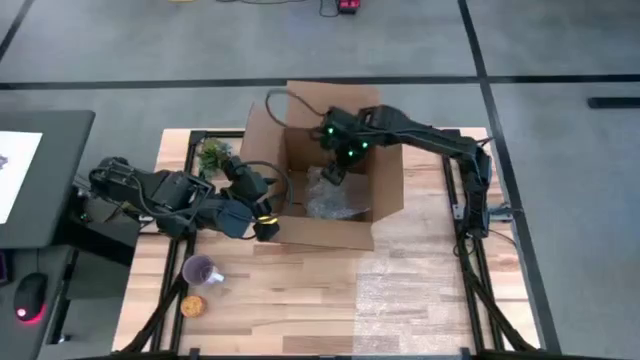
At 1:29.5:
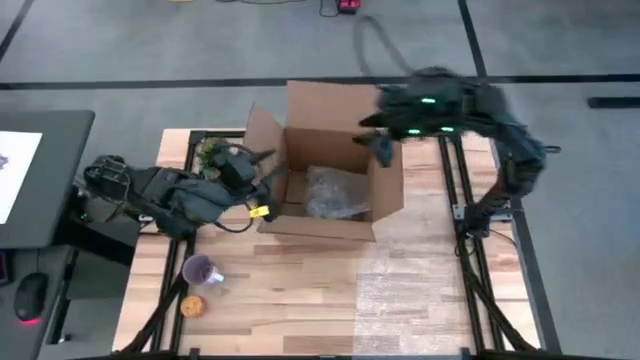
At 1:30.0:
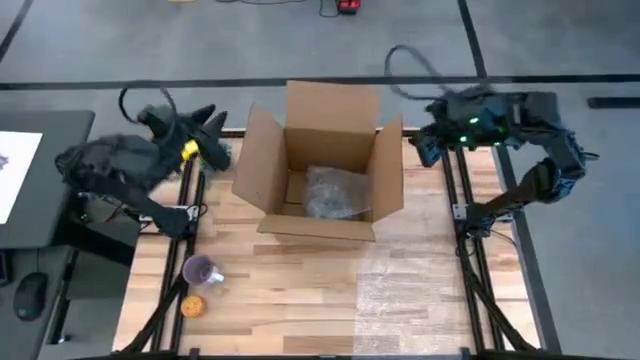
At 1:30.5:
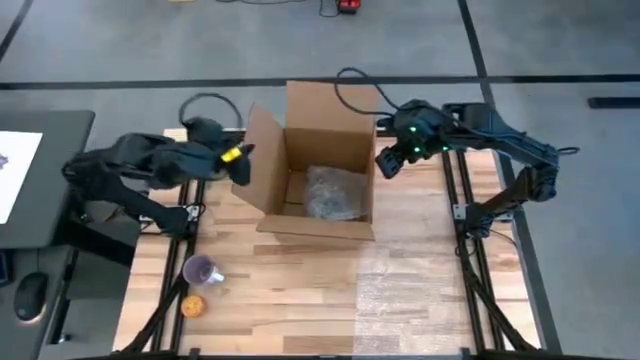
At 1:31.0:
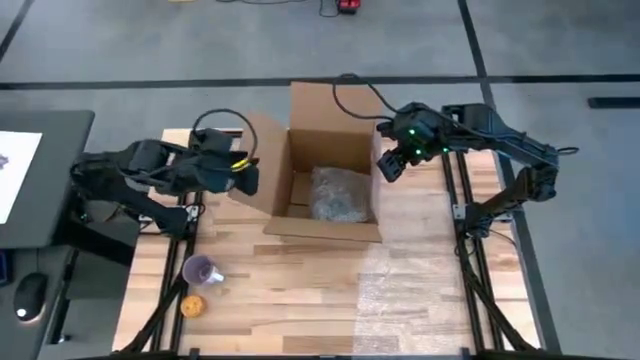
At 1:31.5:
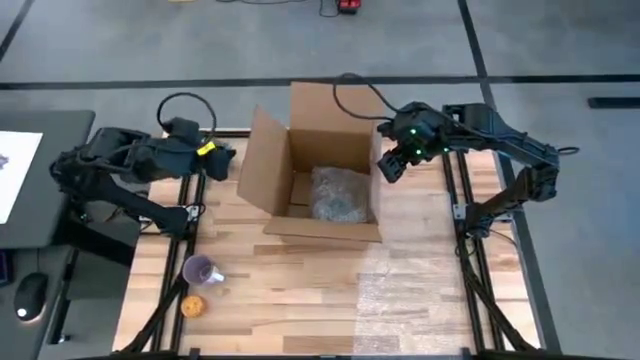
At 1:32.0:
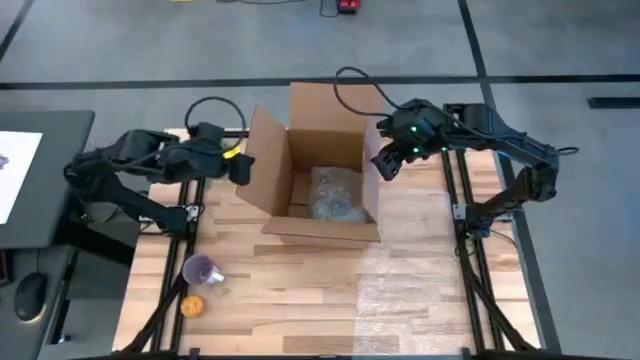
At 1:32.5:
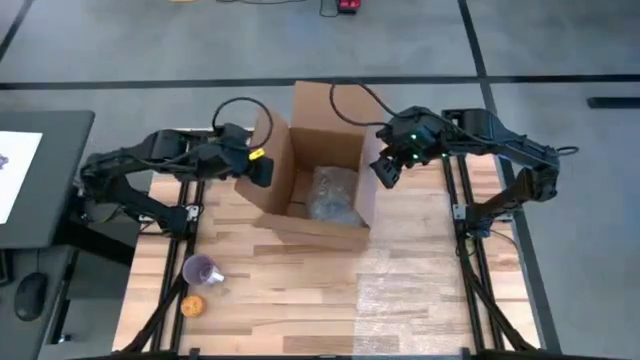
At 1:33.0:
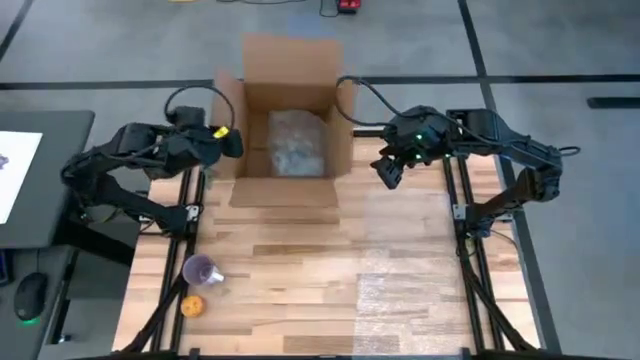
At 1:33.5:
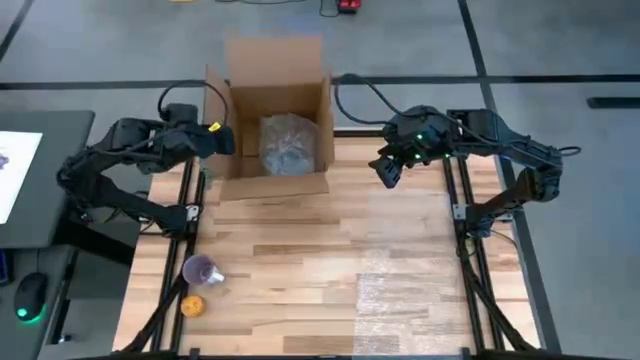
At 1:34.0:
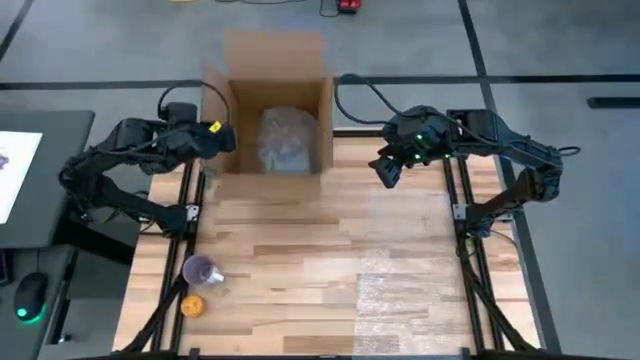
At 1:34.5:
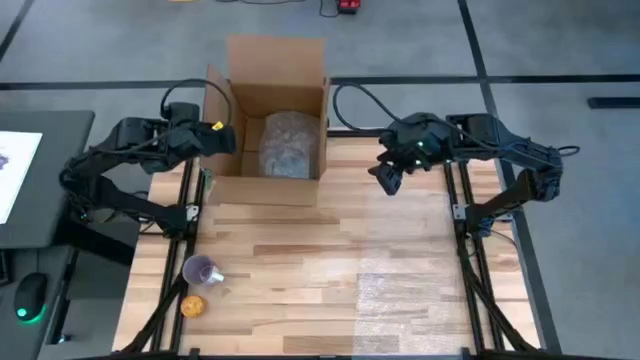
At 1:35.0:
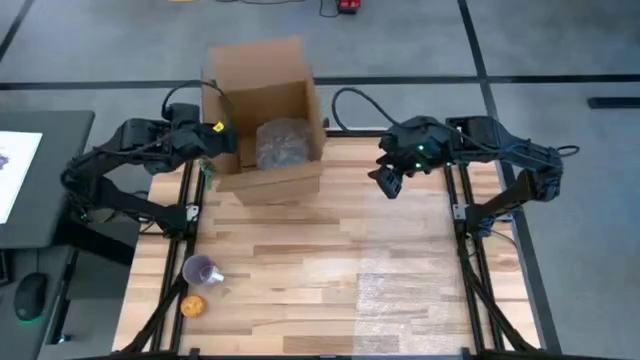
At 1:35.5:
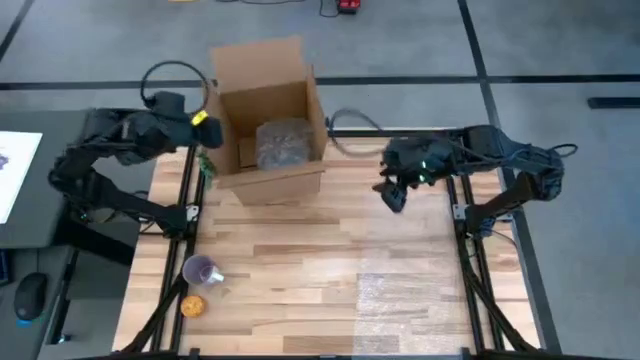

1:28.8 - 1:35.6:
Task: wrap mug
Move the box to the top left

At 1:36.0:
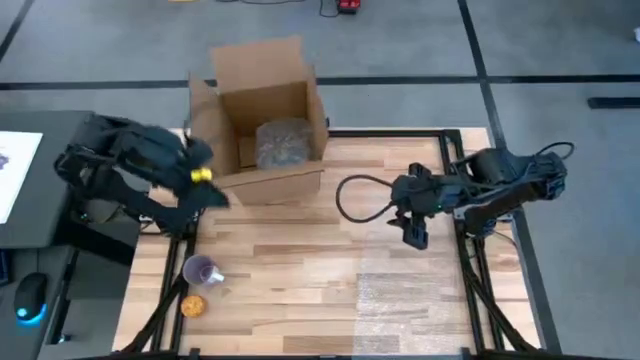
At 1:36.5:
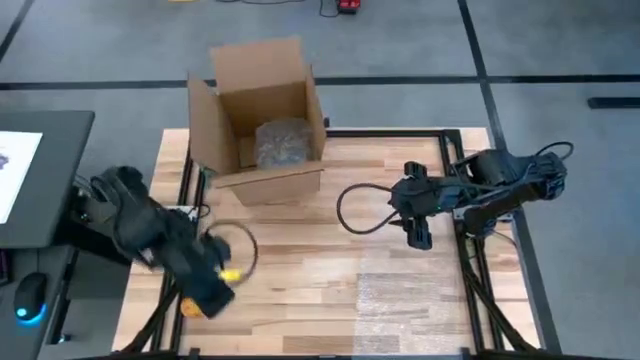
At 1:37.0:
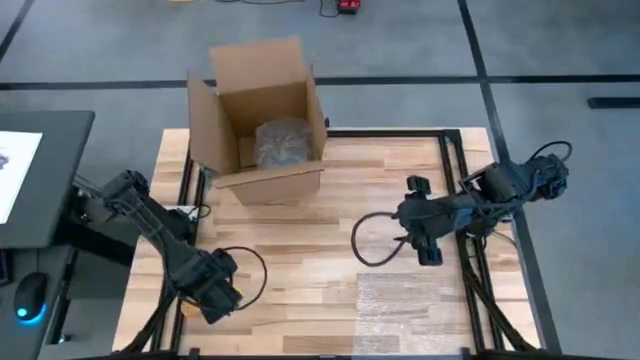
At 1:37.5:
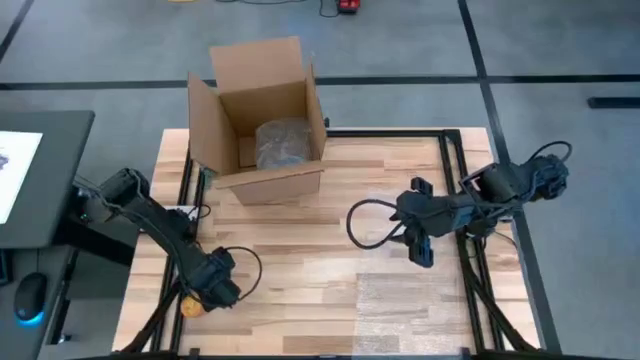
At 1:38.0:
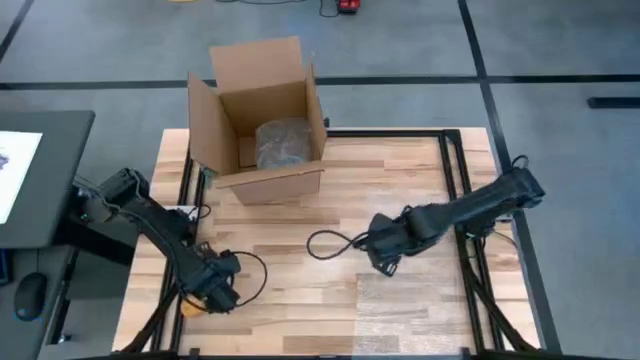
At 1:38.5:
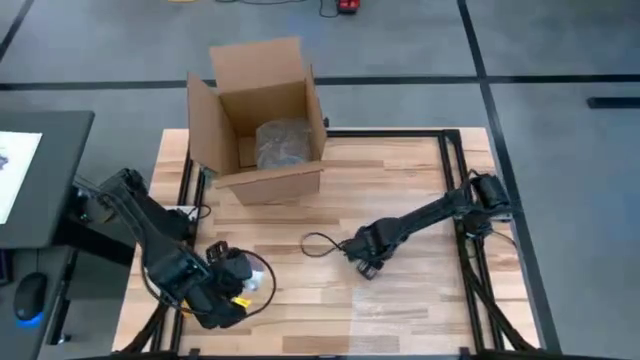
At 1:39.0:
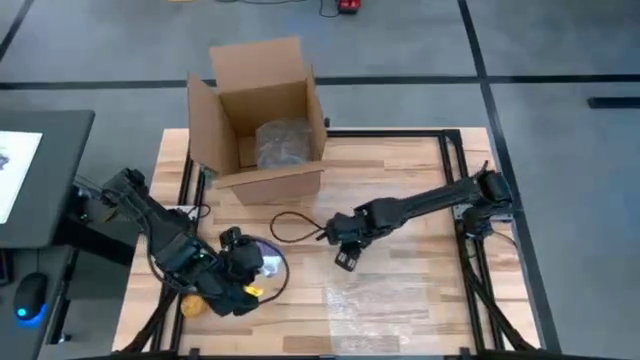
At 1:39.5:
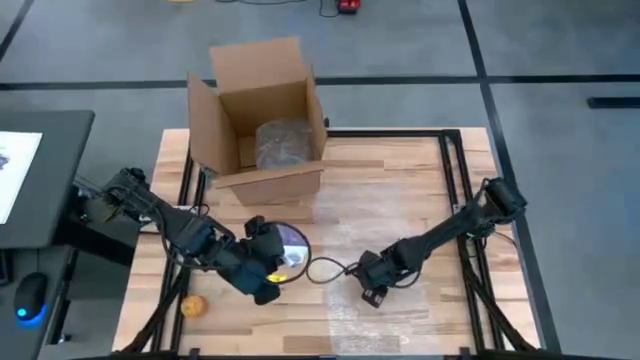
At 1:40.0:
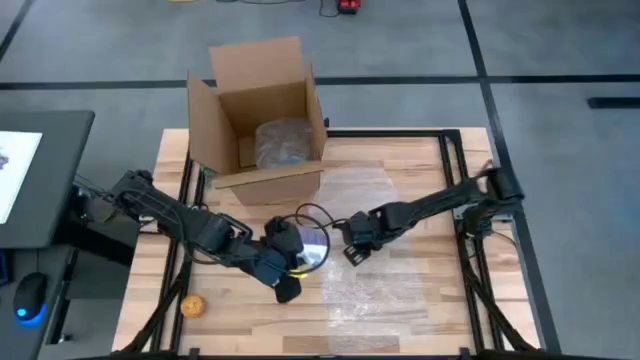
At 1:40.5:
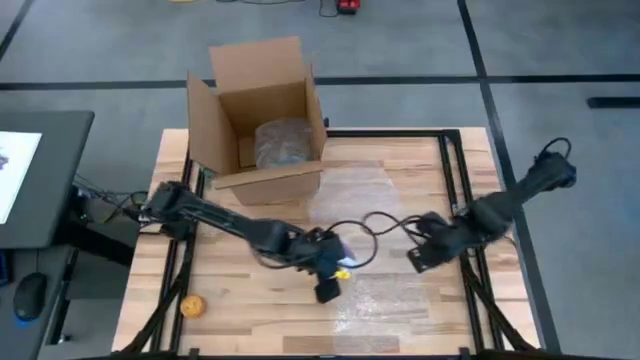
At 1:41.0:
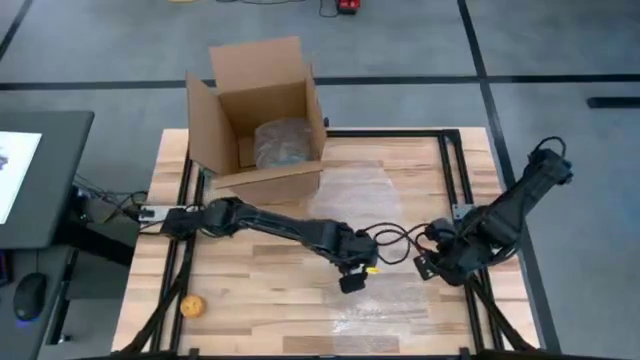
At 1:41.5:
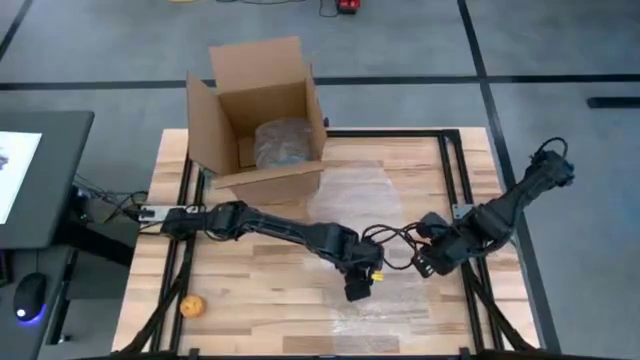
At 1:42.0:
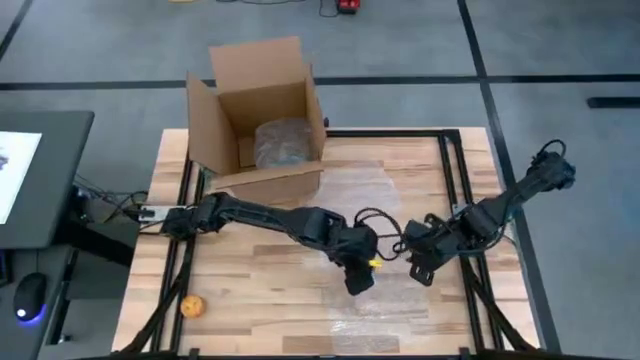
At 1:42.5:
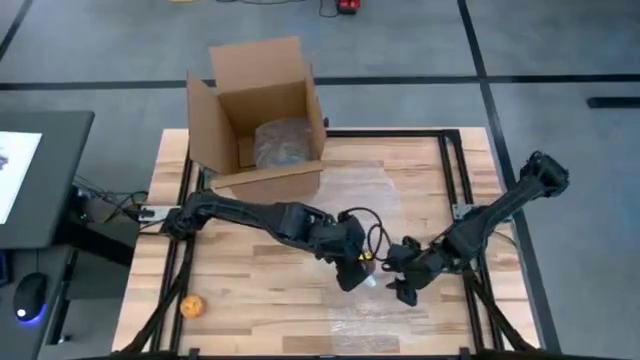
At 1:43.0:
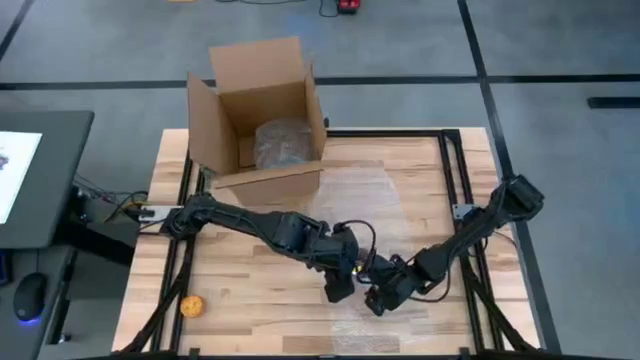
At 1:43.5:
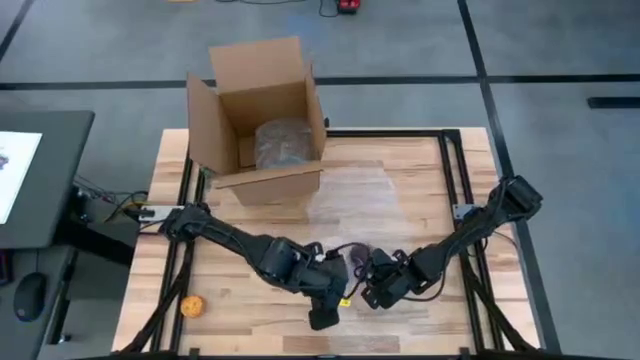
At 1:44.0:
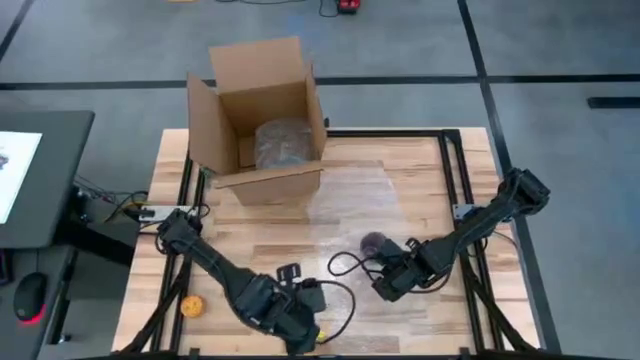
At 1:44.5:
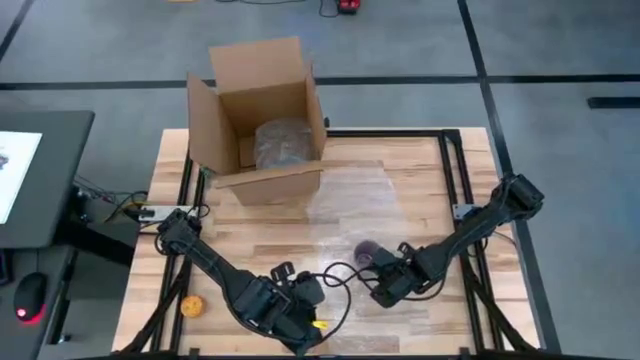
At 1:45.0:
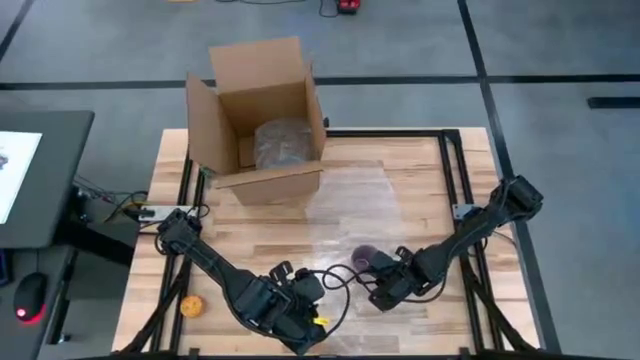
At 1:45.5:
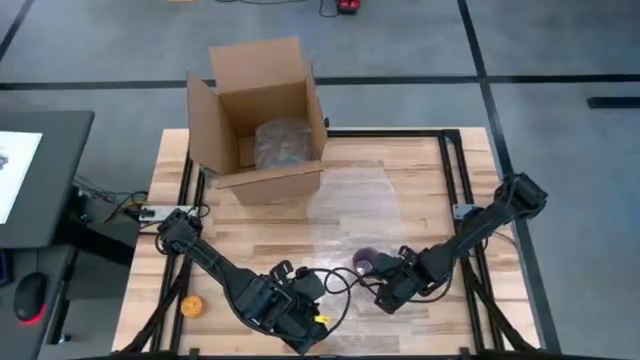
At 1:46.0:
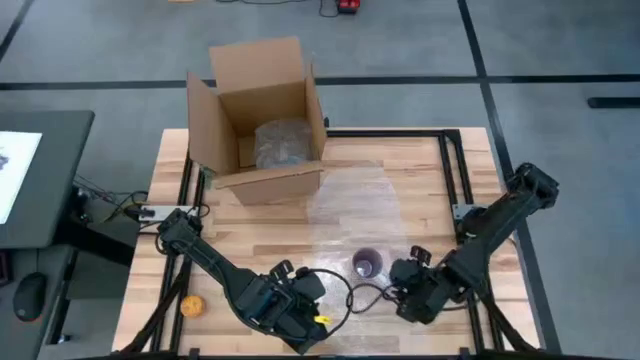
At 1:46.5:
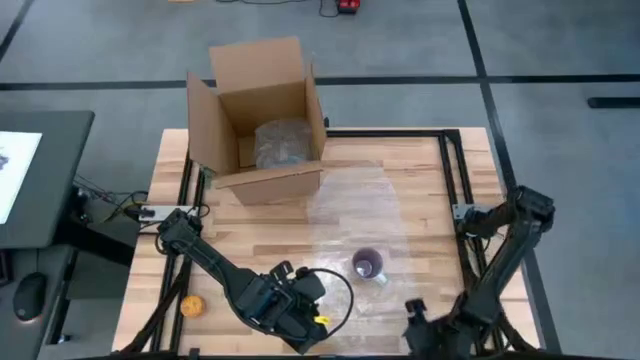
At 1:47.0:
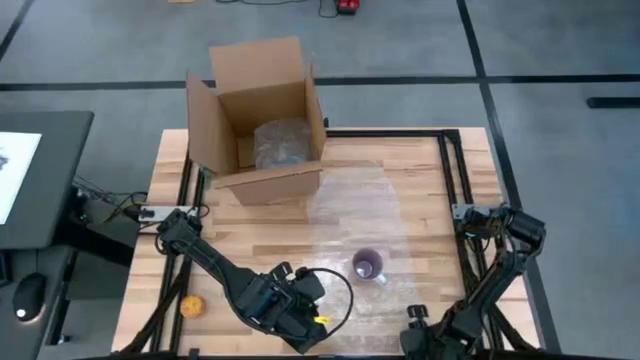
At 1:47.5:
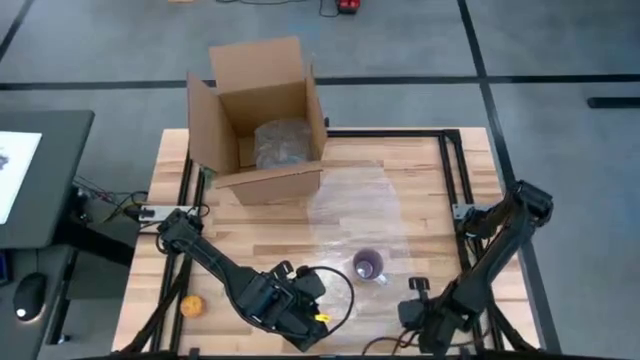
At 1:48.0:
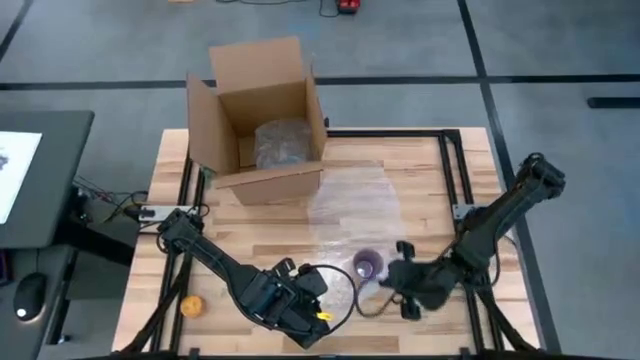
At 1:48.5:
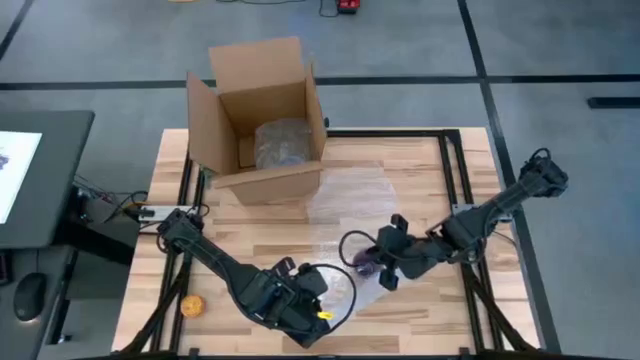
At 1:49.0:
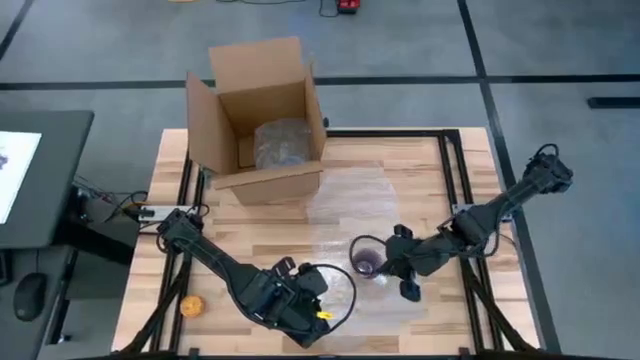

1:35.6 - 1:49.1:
Wrap the purple mug with the bubble wrap

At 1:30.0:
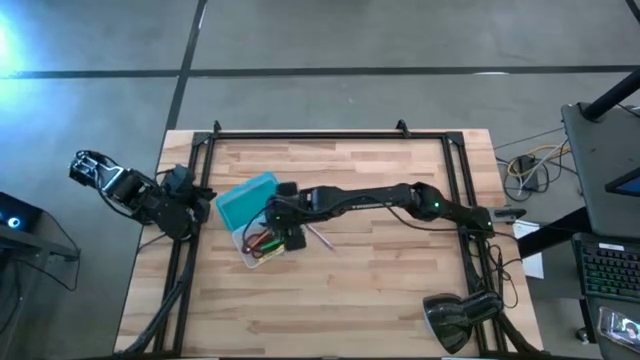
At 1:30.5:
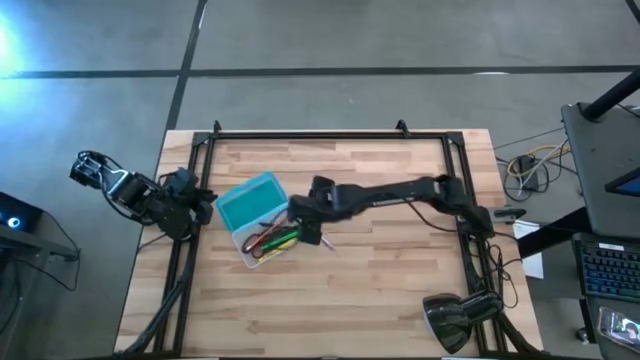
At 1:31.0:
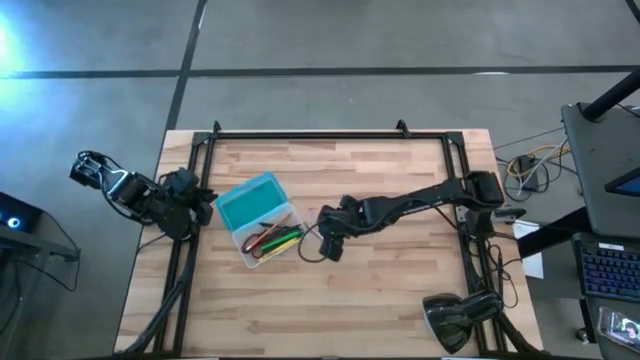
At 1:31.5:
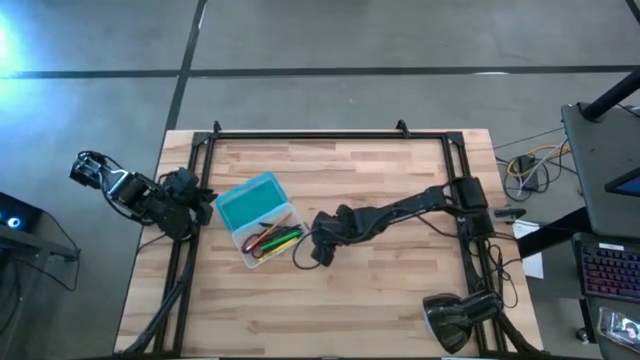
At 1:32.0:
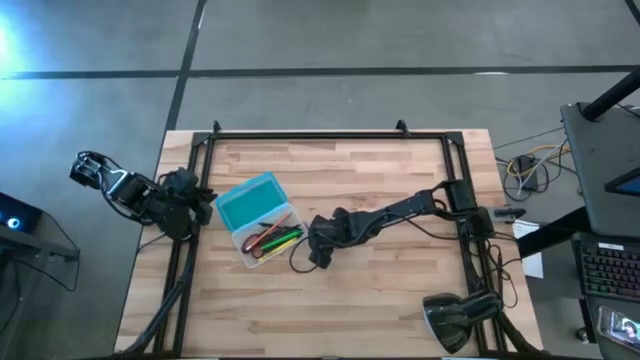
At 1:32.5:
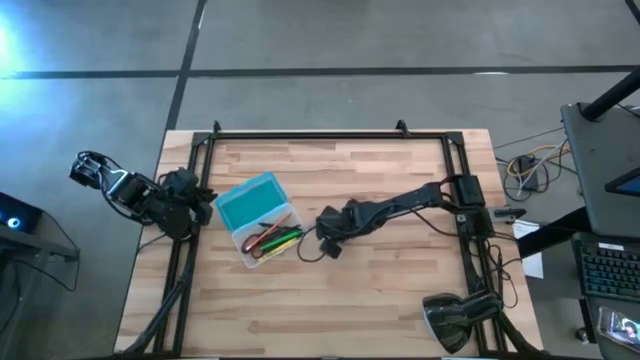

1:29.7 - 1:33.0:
Task: Pick & place school supplies into a supply box
Put the purple pen into the blue supply box
